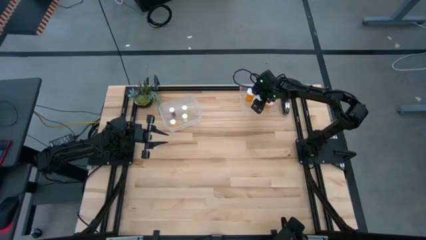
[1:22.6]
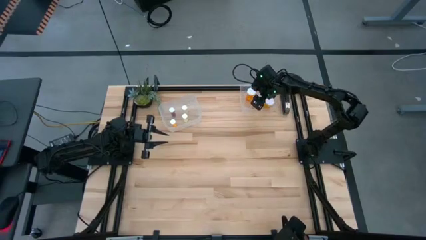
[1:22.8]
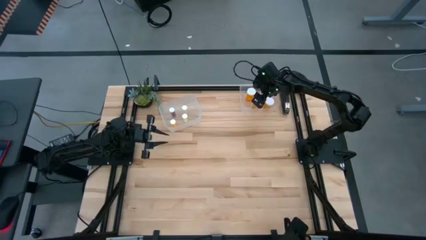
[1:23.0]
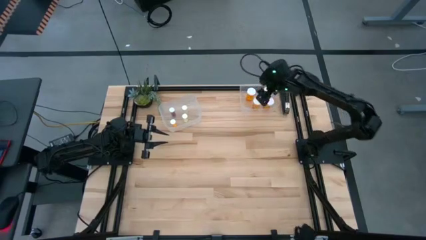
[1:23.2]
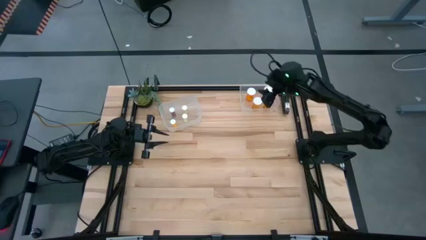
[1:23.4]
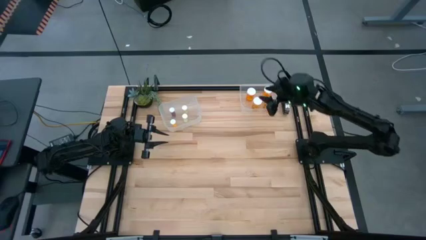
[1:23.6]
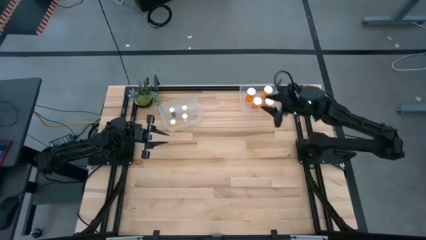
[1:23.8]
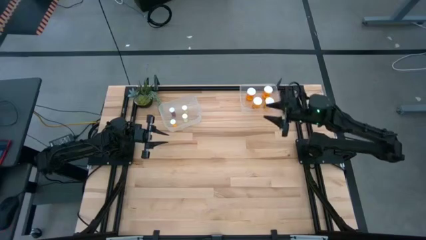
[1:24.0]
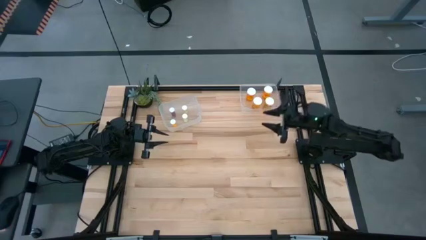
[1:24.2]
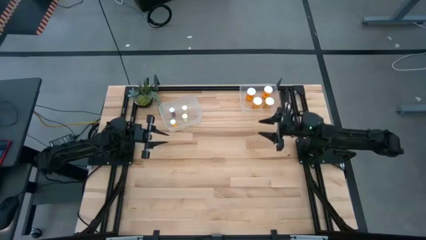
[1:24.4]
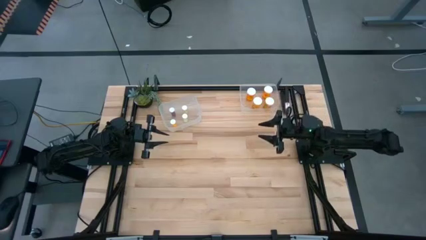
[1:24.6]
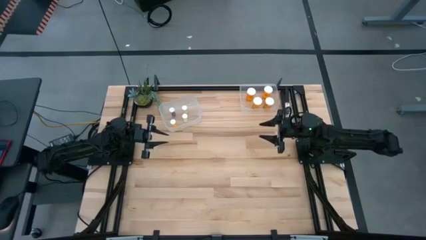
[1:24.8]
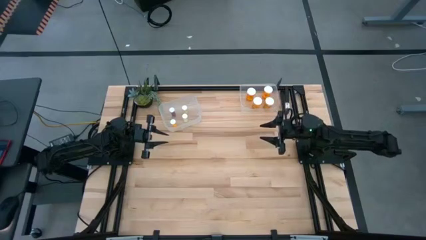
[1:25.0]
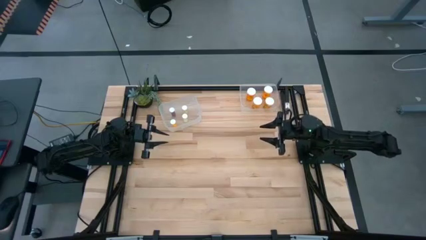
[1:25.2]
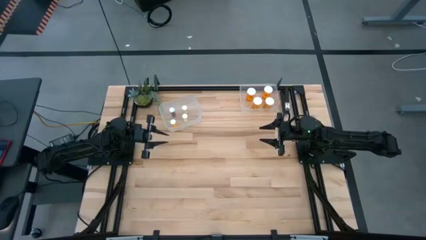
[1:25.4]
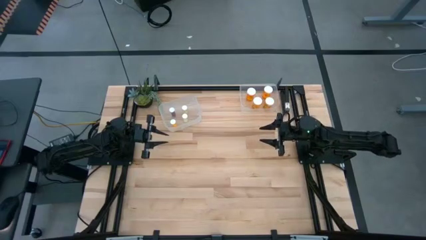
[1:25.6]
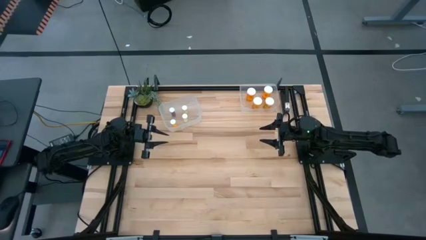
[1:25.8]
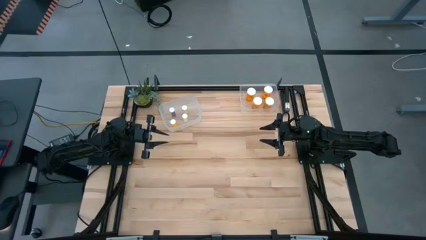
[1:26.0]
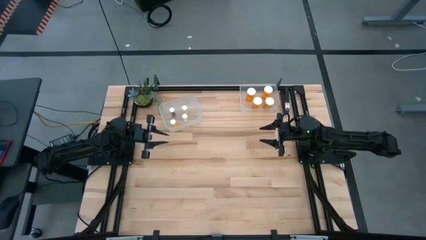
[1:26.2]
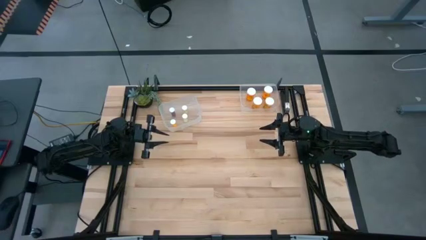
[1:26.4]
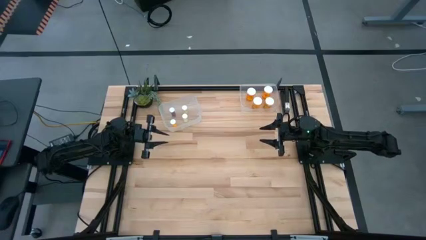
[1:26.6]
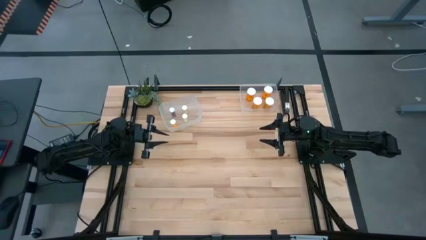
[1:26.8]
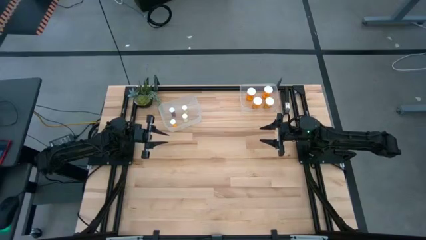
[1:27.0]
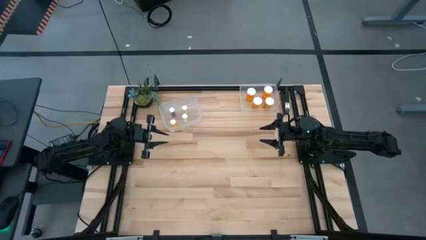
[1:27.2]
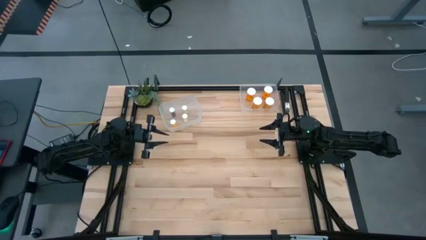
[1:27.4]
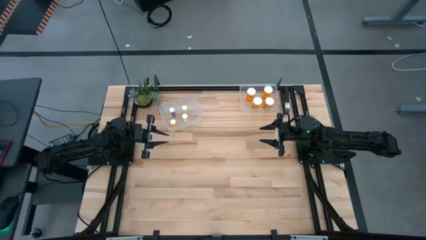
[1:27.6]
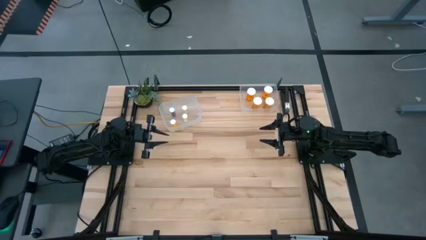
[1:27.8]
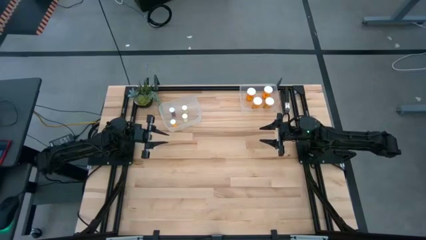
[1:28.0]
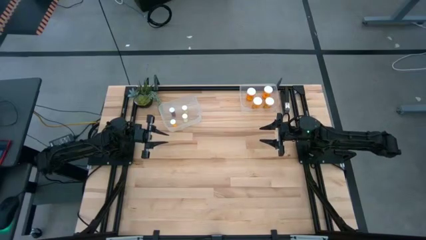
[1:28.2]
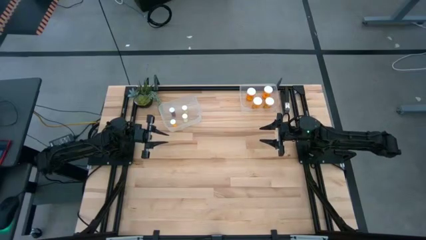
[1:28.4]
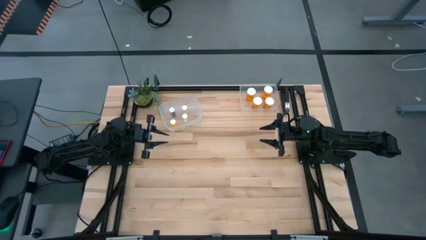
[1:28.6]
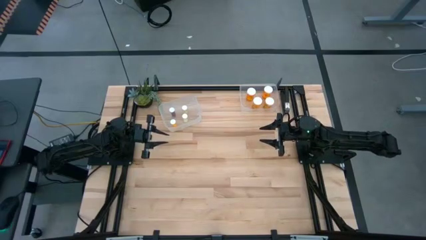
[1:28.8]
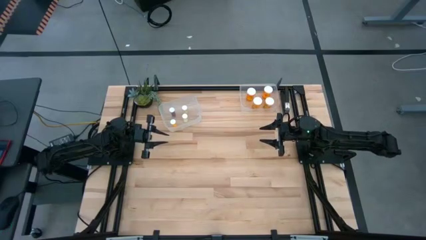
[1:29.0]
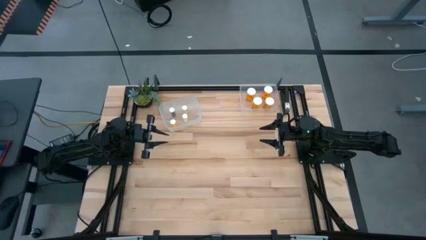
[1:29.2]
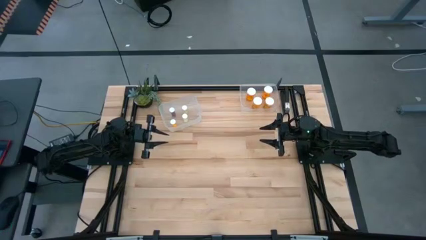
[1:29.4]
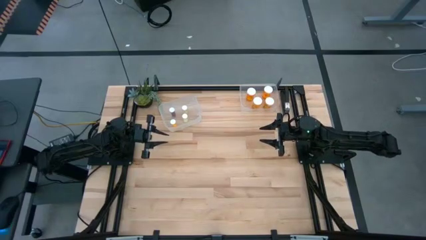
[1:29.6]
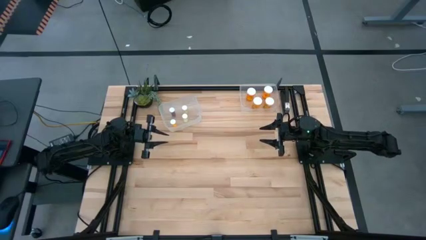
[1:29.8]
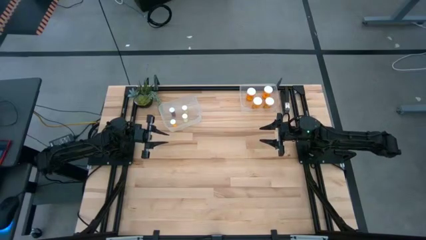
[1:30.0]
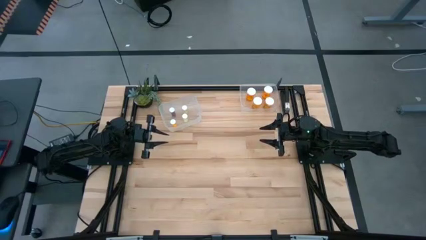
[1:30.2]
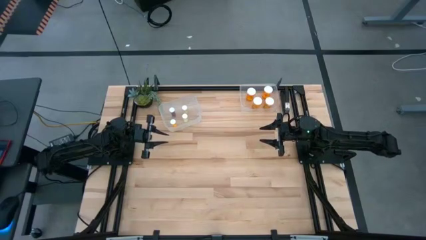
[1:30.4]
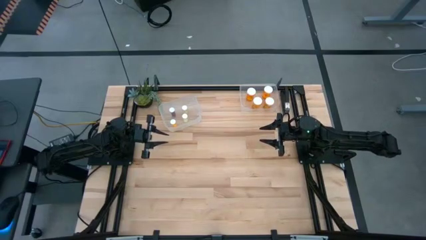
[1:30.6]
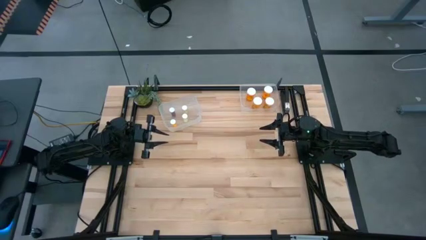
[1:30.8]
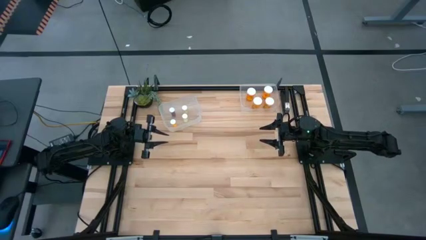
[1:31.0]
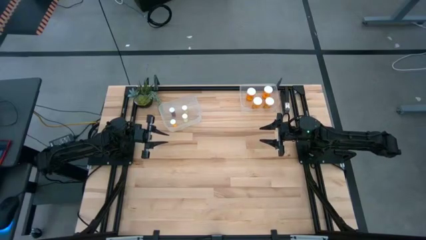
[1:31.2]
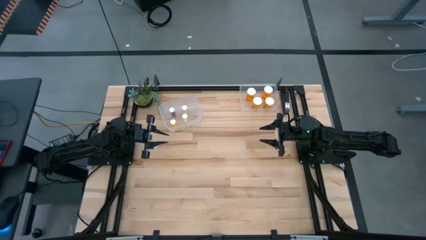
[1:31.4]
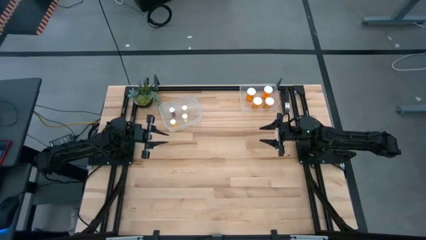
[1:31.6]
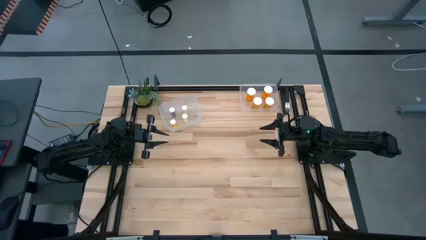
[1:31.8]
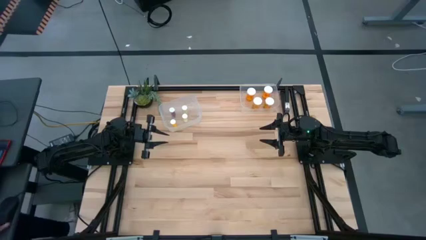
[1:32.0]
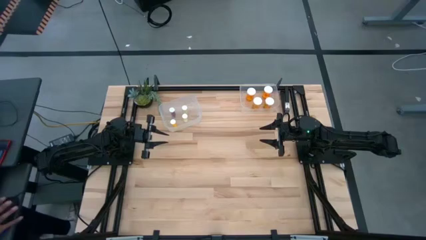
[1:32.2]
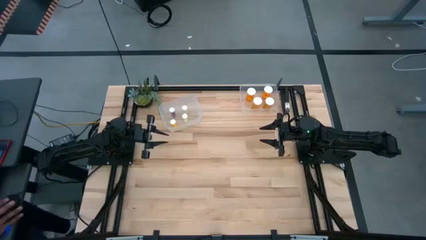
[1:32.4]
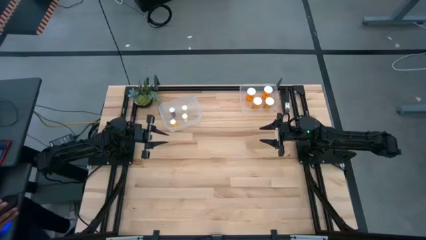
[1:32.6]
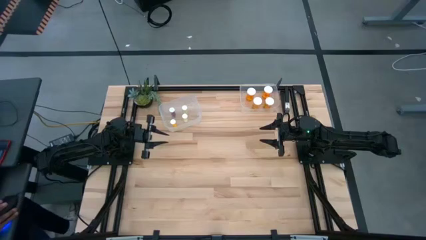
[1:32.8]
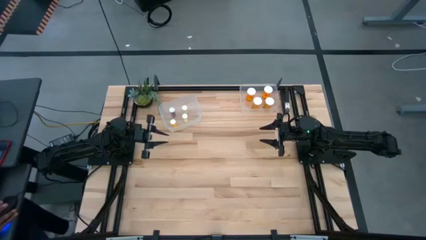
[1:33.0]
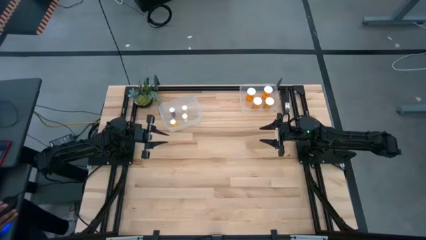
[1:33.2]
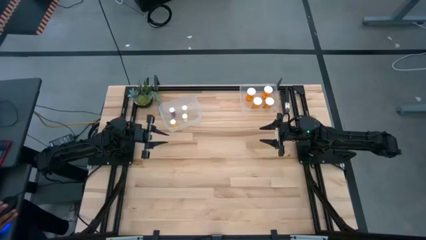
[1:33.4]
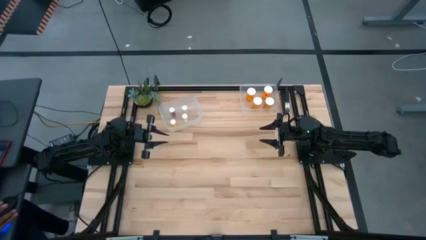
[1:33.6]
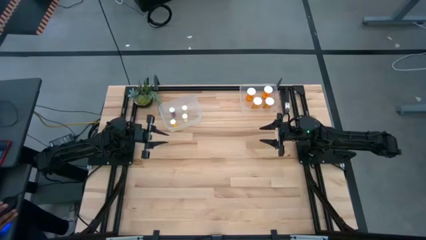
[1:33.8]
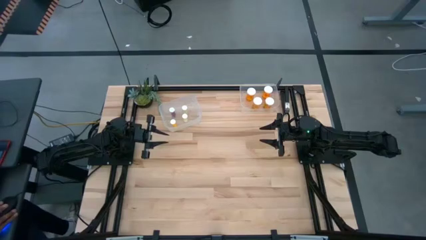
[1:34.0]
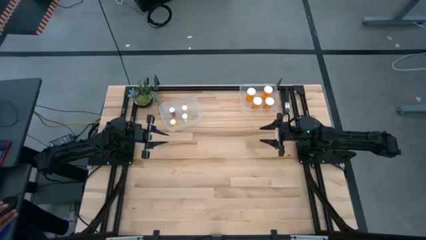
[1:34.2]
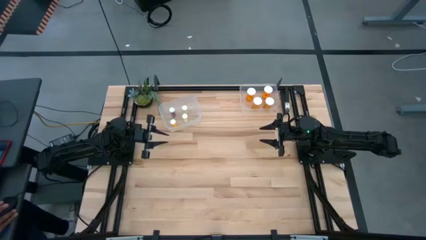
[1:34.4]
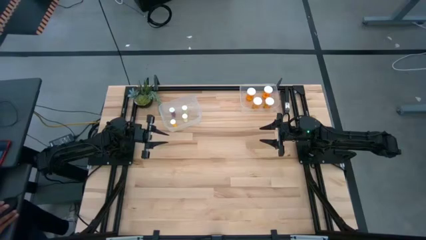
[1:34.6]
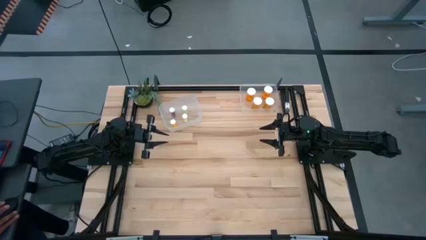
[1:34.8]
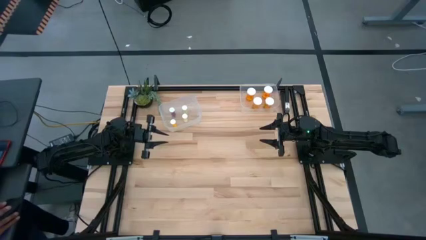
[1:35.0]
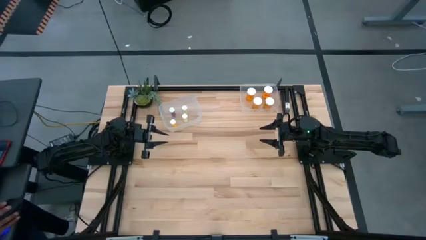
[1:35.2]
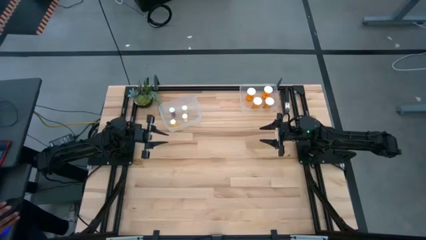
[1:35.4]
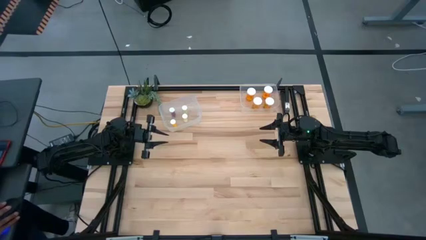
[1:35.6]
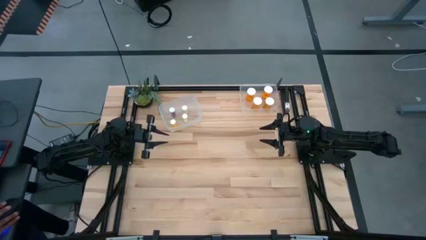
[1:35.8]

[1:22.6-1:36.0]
Task: Pick and place medicine bottles into bin by pill shape (circle, oval)
Return to Home Position

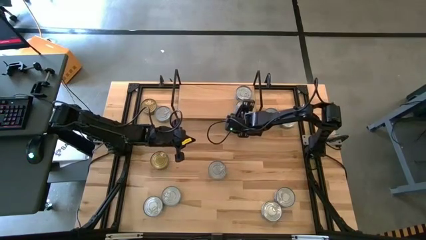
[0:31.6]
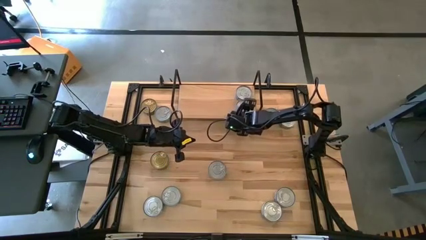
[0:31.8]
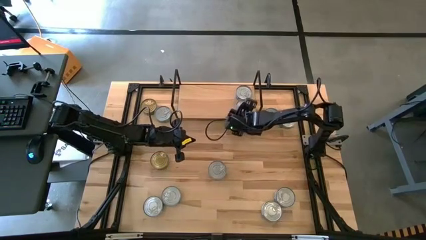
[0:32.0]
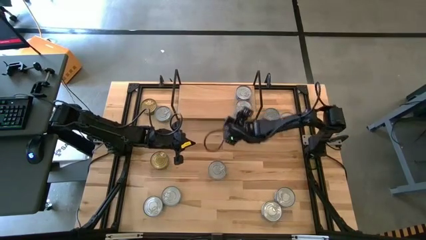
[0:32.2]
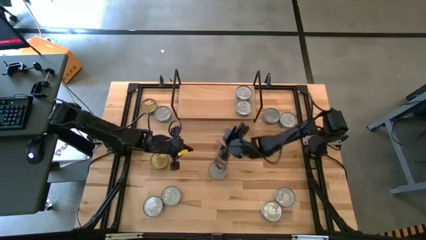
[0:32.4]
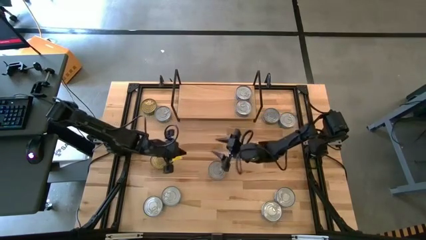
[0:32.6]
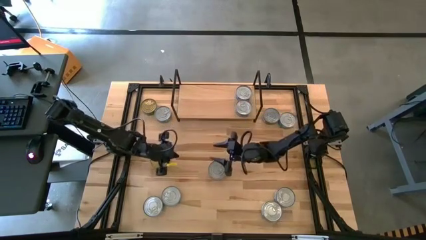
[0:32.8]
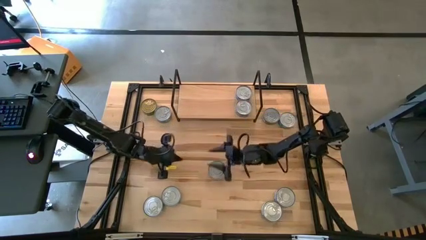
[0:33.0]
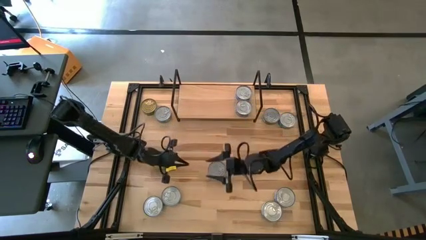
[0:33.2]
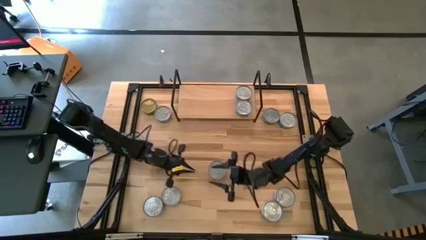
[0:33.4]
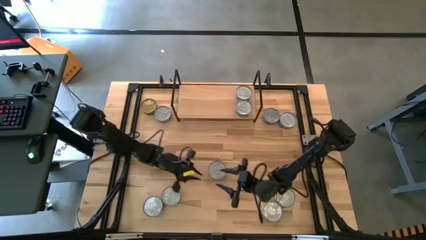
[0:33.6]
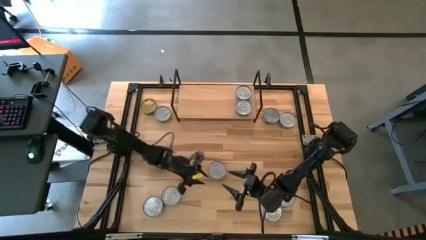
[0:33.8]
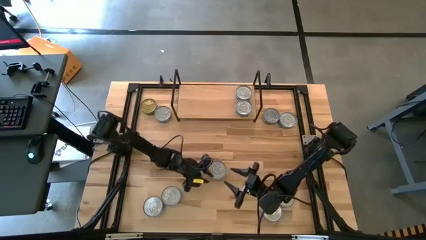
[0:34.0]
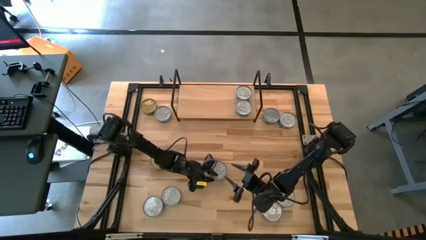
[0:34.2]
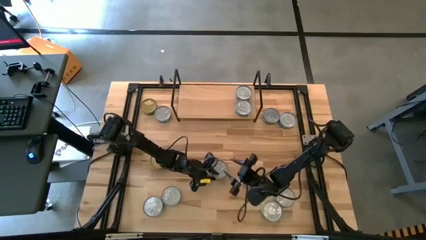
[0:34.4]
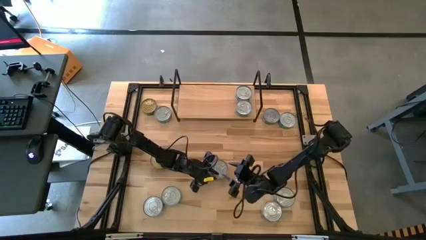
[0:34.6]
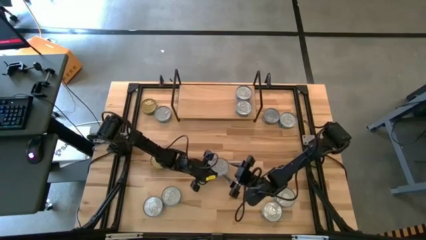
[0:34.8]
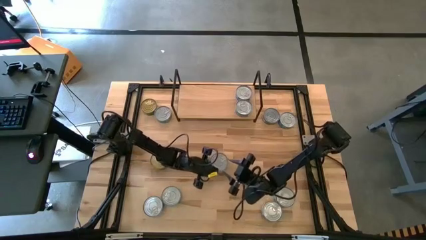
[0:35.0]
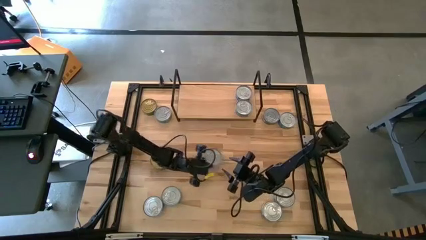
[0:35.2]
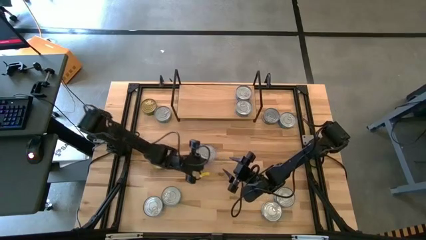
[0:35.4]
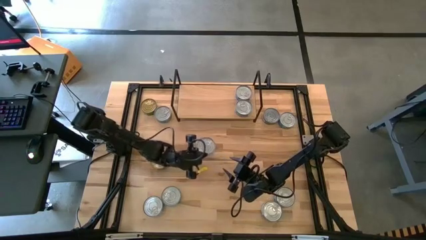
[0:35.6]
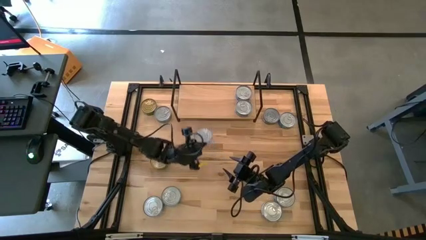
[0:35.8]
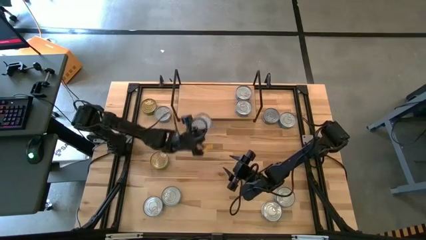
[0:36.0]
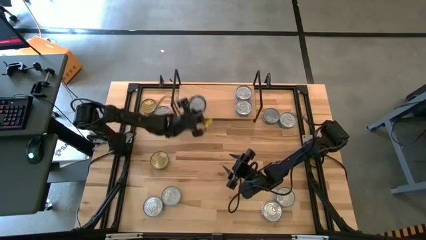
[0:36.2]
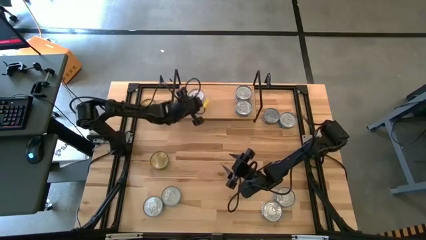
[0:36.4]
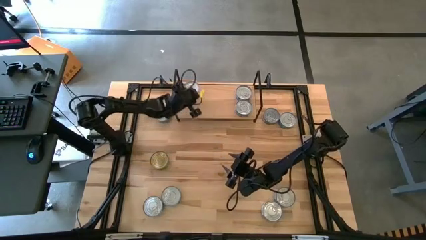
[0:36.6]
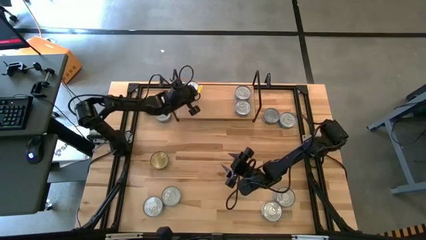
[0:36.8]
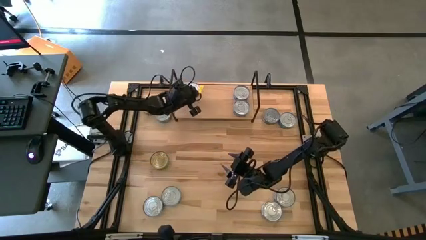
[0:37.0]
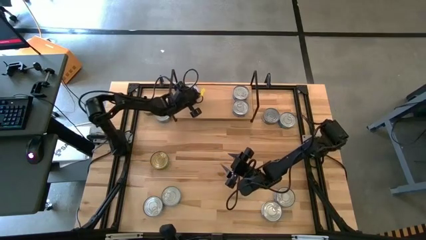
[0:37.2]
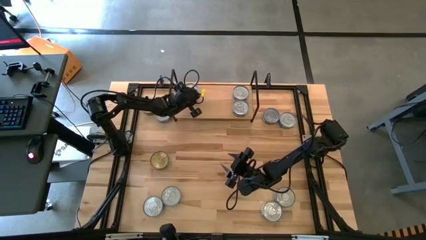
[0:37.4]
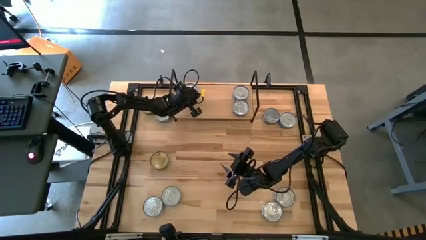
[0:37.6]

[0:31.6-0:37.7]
Task: Stack canned seafood by type on shelf
Put the green tuna can on the shelf
